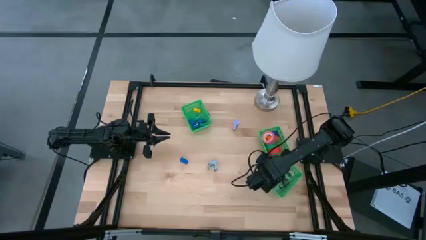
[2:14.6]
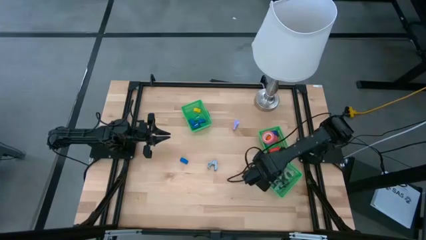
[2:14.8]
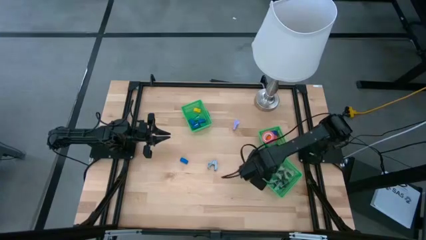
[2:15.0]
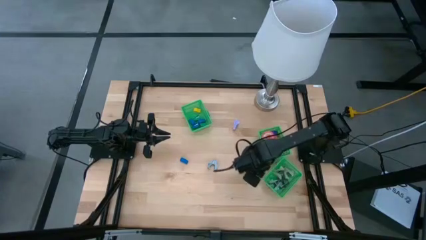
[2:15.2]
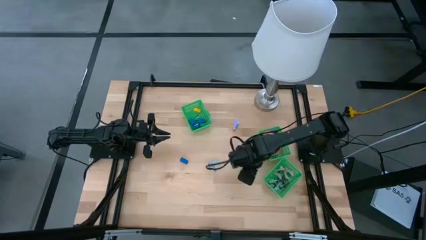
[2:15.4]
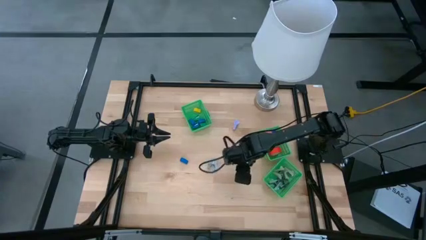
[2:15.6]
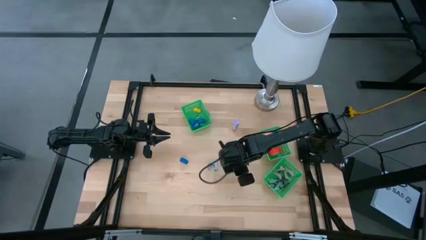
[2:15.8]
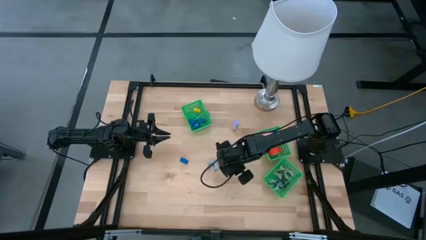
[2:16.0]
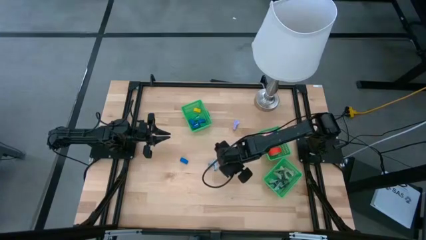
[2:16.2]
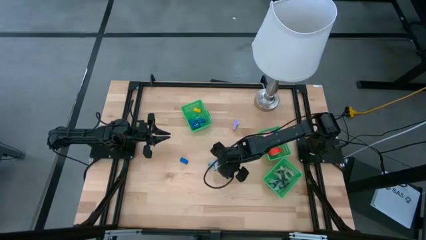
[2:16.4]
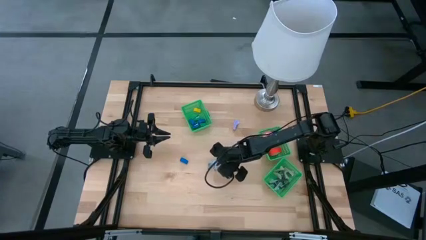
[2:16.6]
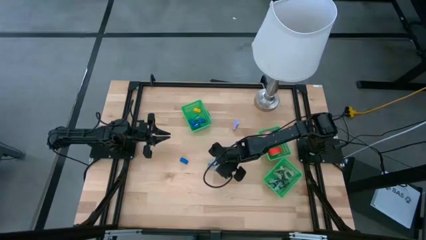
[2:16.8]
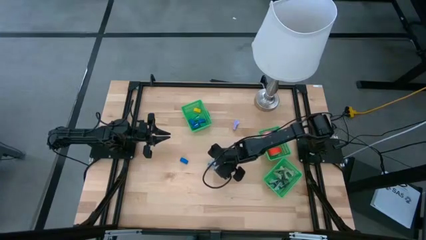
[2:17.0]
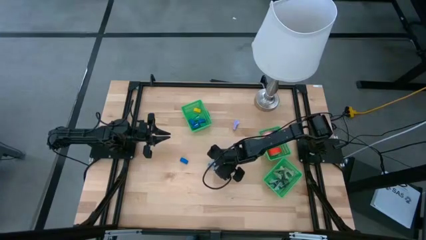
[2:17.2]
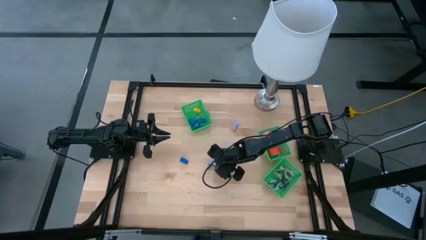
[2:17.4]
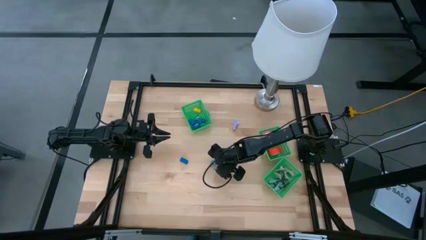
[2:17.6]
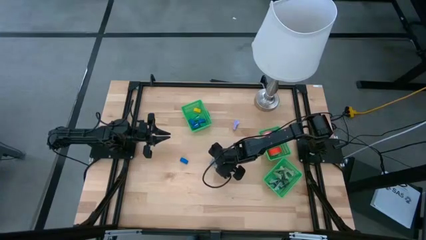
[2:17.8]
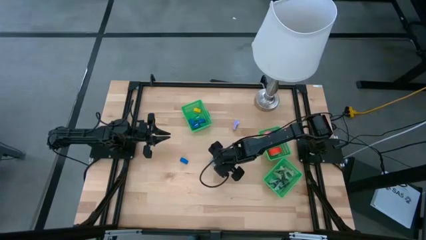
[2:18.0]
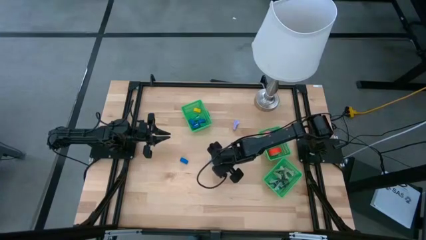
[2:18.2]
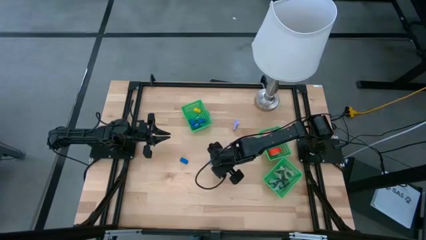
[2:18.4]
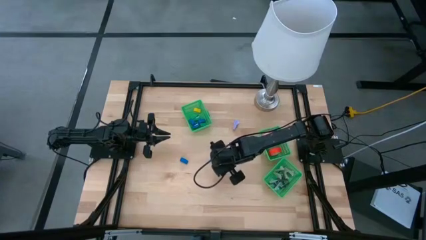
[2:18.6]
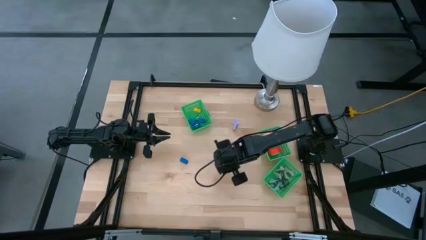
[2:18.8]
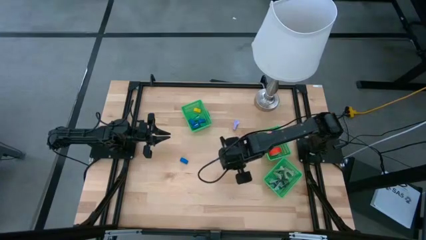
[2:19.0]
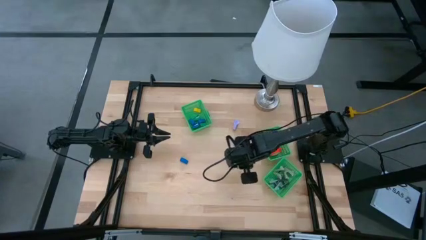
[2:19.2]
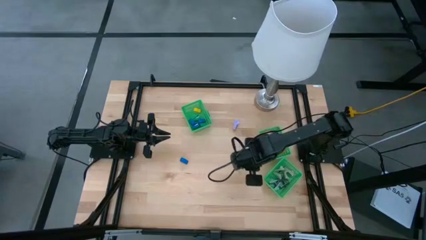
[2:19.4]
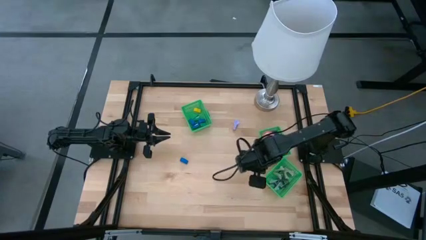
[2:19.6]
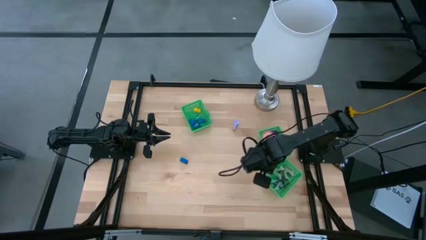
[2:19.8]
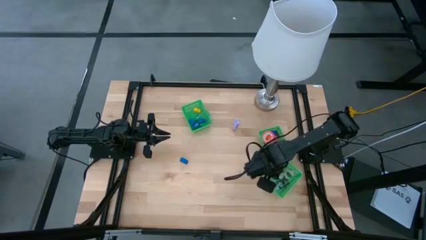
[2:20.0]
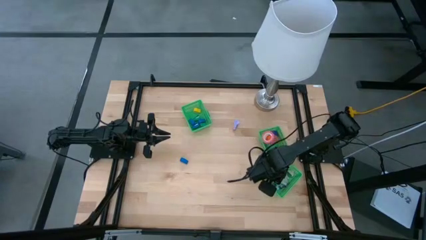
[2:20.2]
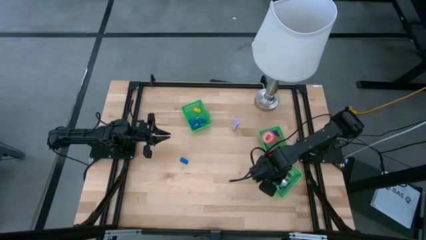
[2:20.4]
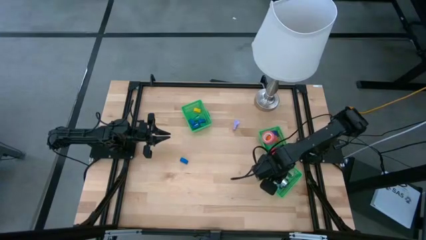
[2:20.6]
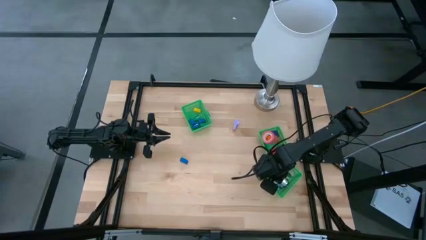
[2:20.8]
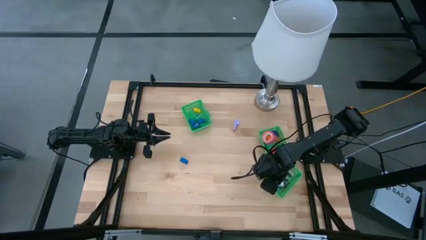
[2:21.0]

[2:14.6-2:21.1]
Task: Pick and place Stapler, Stapler remover, tape
Put the light blue staple remover into the bottom left green bin

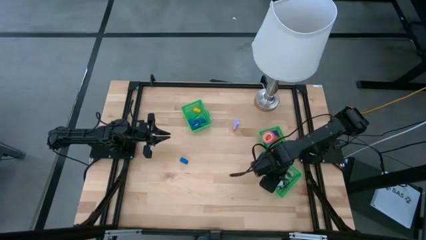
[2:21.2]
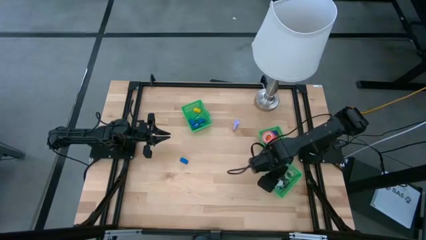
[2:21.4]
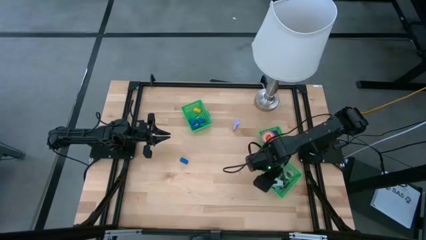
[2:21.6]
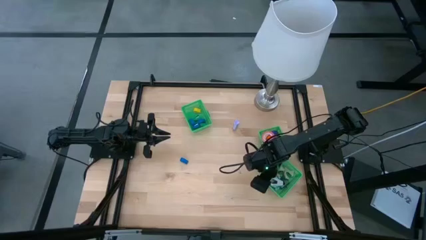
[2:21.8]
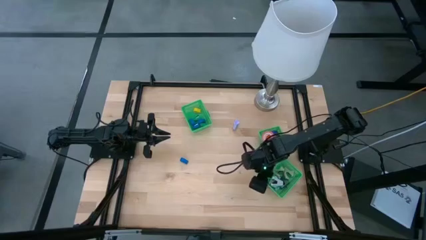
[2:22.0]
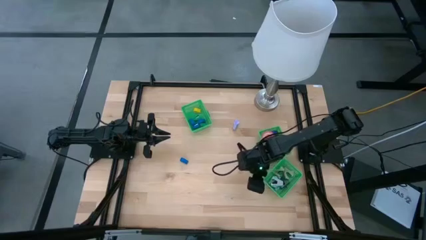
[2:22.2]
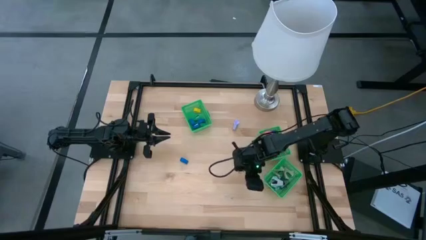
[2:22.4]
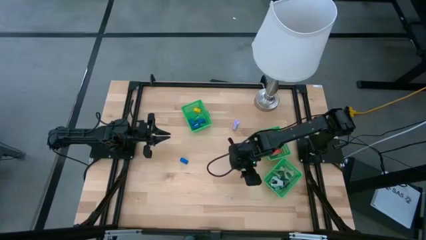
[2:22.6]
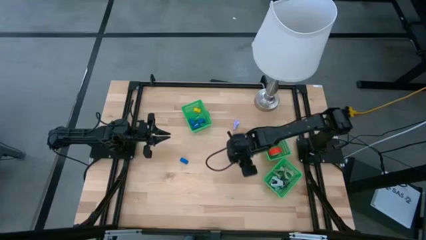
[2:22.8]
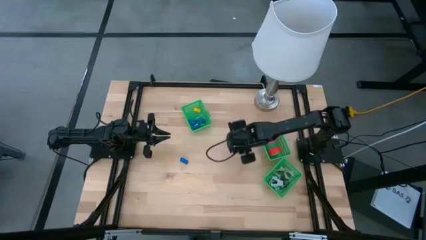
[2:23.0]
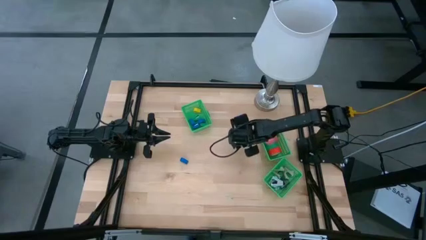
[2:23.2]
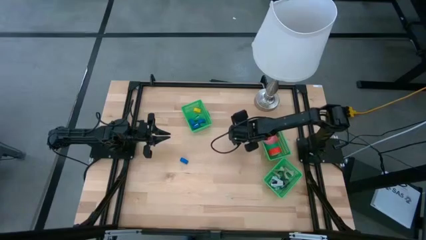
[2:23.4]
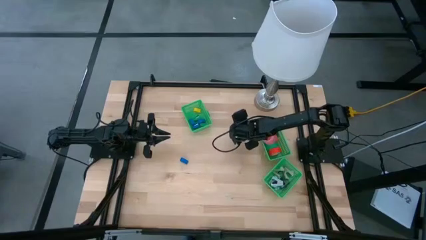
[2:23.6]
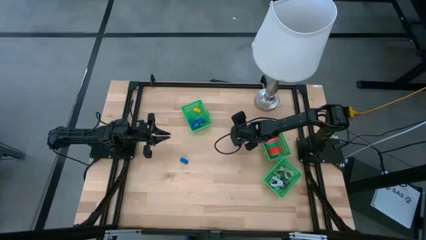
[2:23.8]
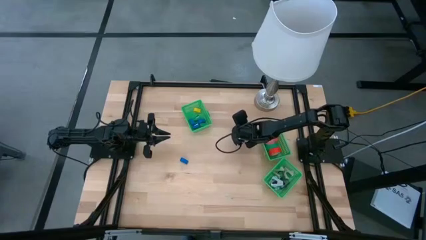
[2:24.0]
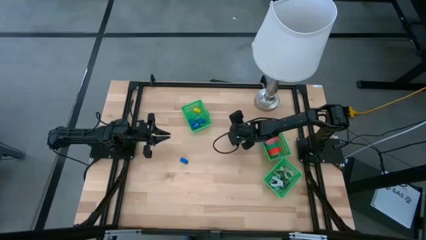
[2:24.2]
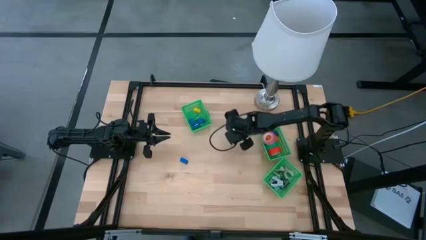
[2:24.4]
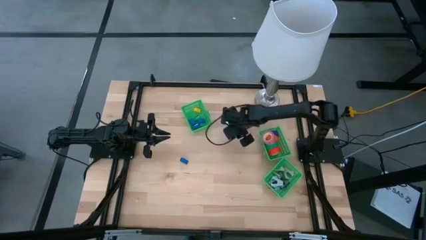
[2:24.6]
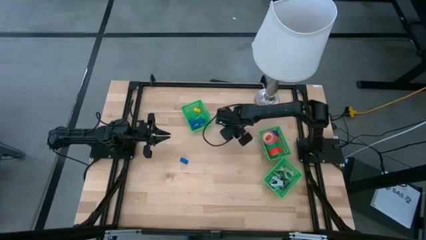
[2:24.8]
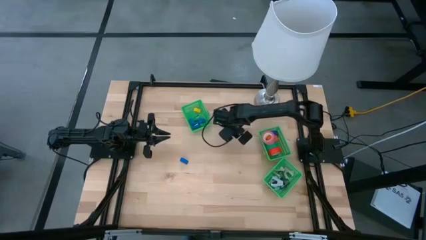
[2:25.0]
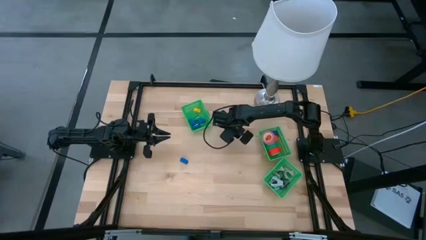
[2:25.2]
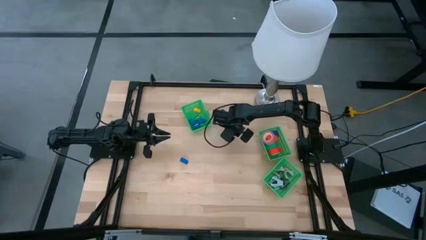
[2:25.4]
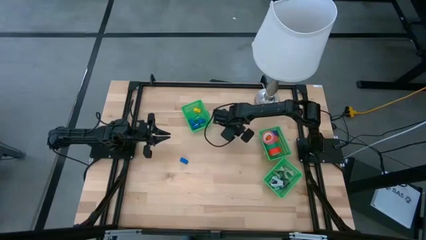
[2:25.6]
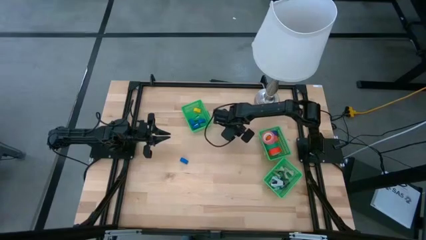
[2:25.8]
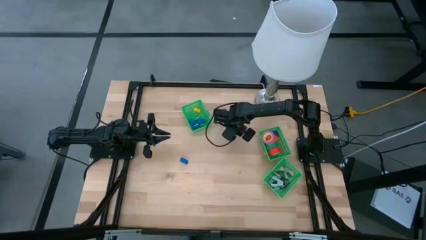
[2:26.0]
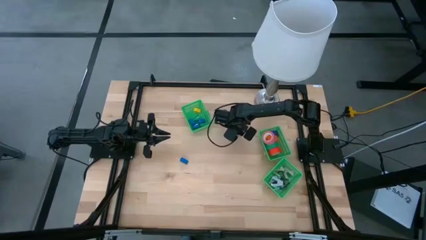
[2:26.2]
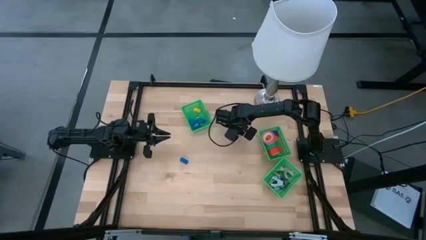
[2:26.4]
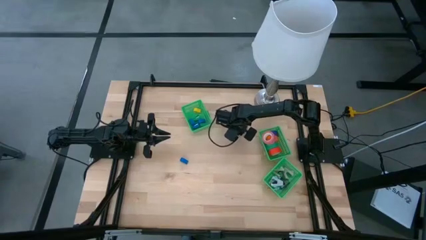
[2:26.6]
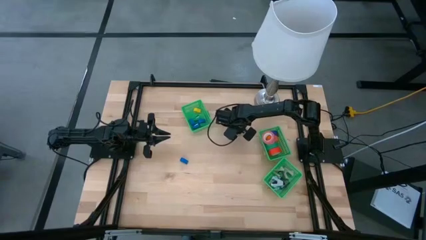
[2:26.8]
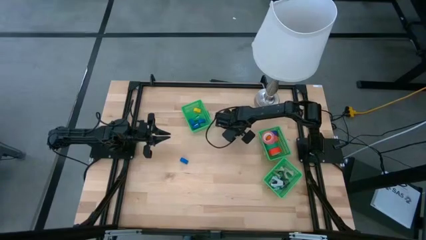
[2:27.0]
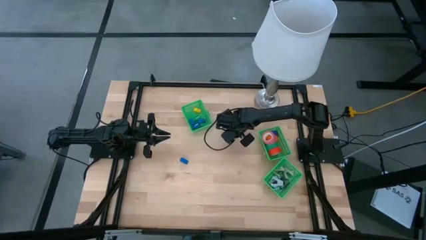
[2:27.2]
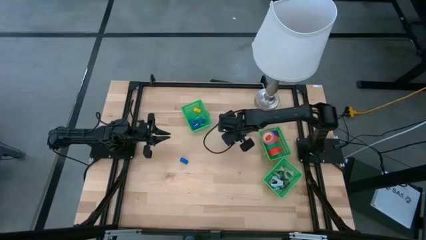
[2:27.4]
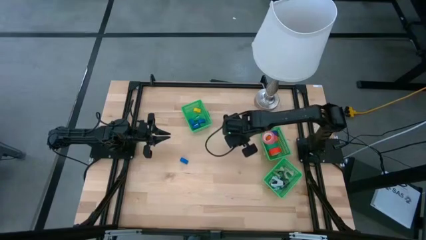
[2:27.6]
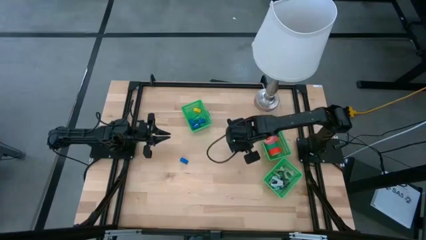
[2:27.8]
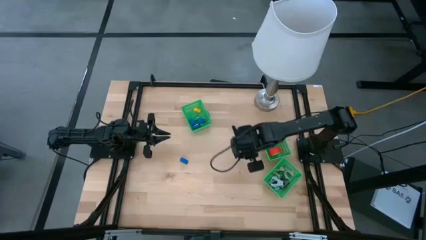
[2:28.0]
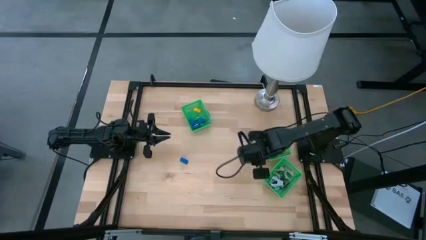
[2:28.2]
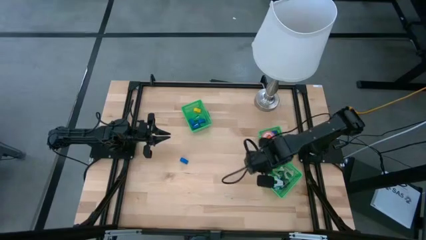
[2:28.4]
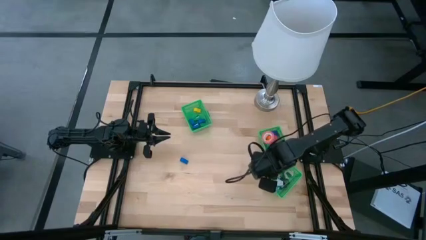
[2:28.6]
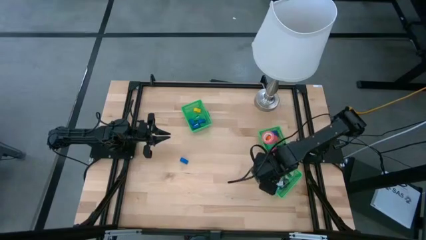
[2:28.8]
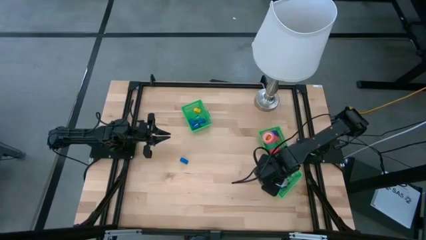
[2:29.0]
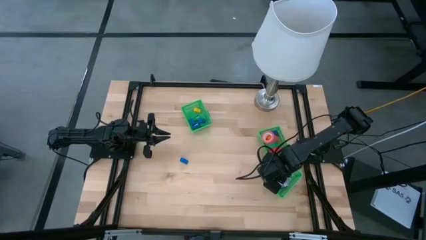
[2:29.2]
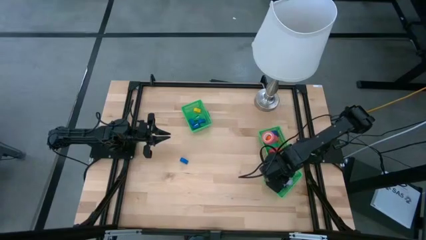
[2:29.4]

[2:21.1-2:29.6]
Put the violet staple remover into the bottom left green bin

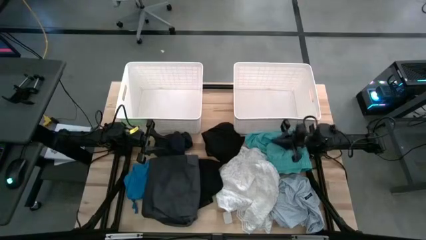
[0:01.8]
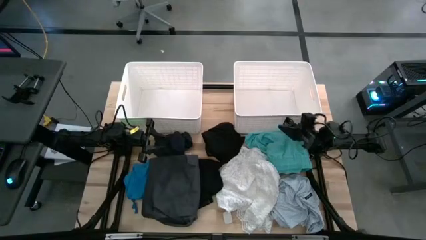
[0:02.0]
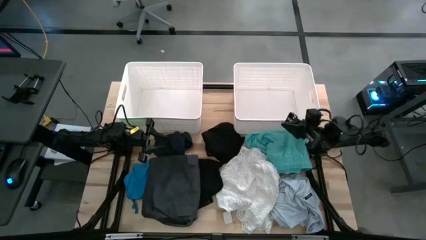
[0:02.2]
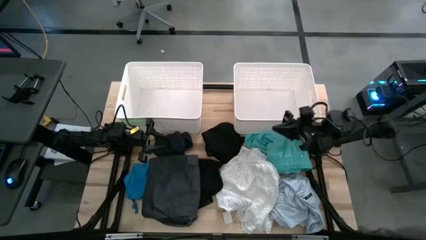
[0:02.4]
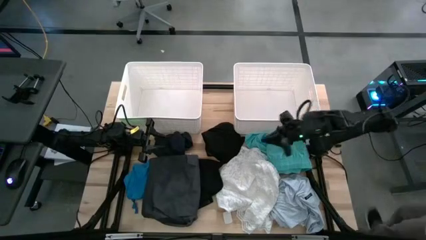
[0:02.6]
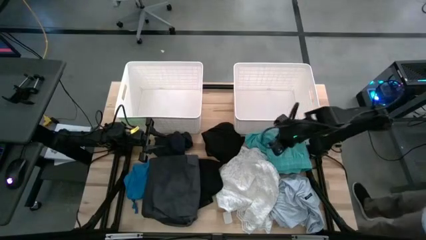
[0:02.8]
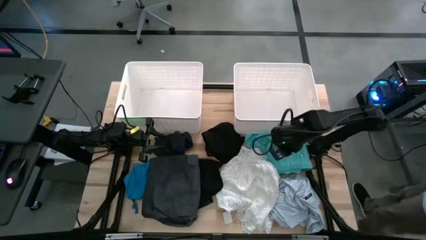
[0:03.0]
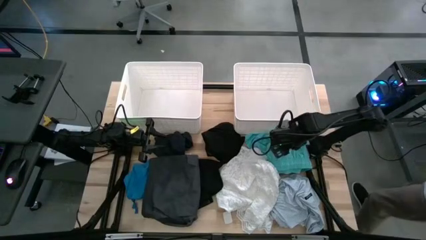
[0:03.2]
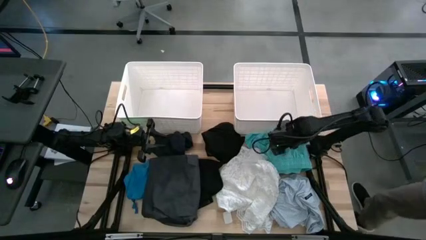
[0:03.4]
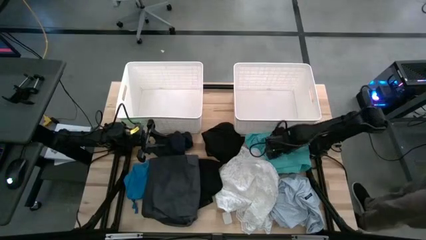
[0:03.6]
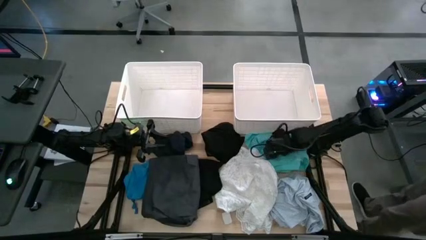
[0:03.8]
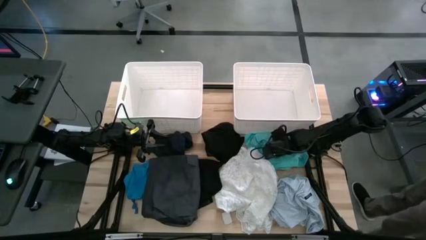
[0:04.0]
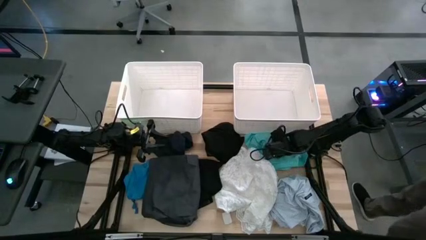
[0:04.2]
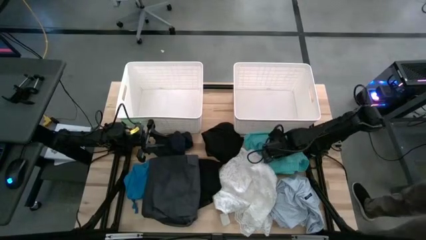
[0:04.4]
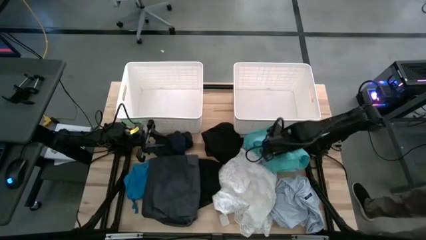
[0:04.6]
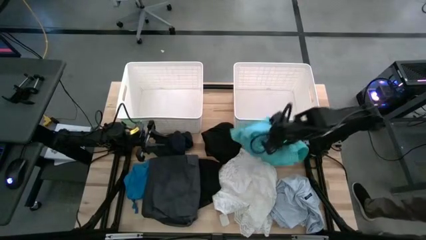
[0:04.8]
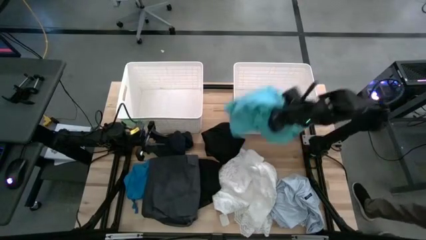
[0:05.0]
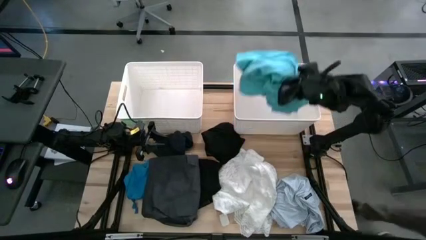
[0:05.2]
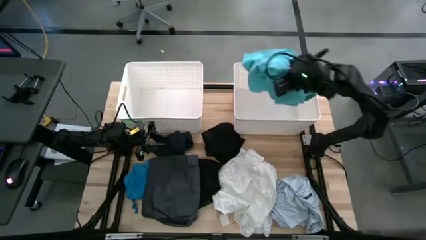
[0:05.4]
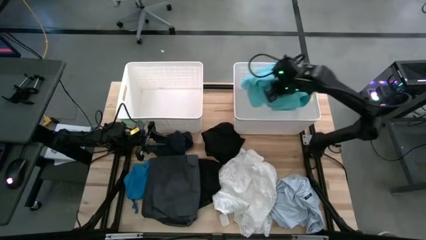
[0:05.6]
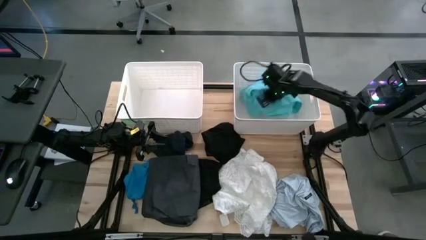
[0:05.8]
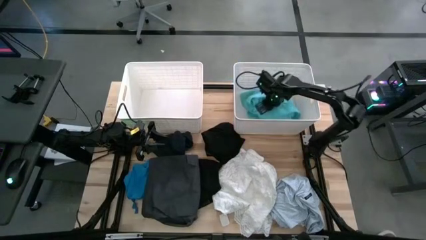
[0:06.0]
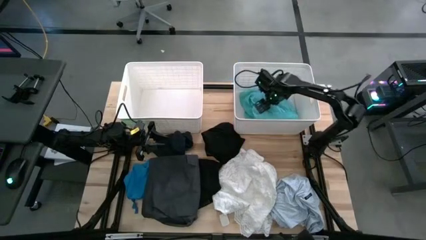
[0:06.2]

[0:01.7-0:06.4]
Task: Sort clothes
Put the light blue shorts into the right bin
